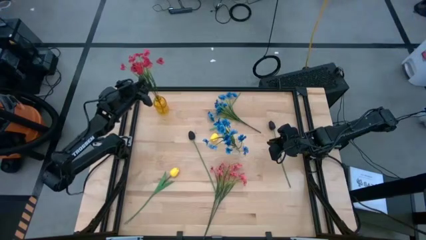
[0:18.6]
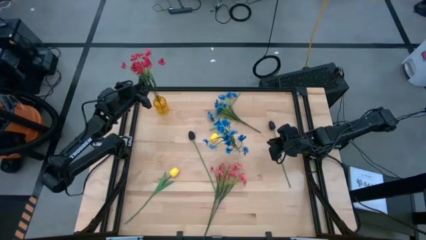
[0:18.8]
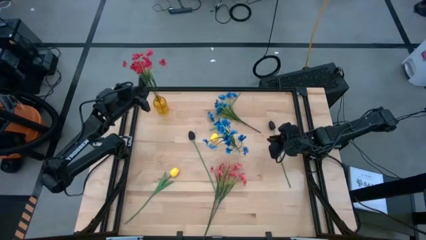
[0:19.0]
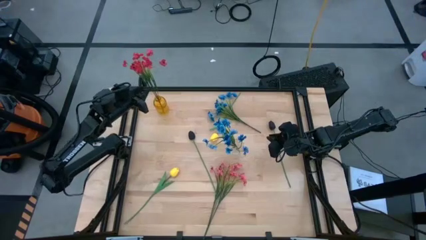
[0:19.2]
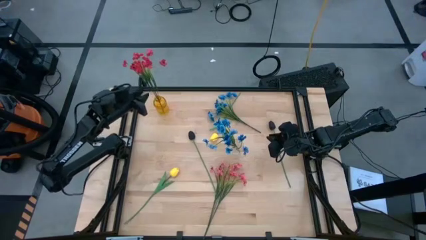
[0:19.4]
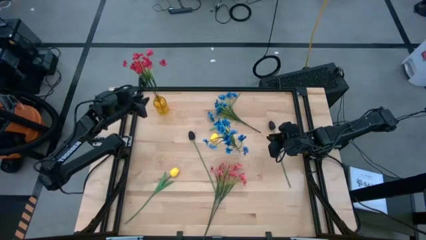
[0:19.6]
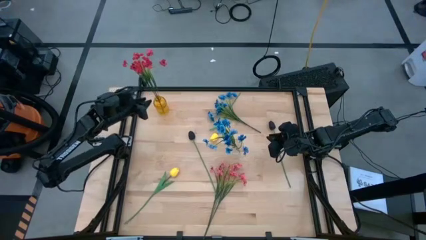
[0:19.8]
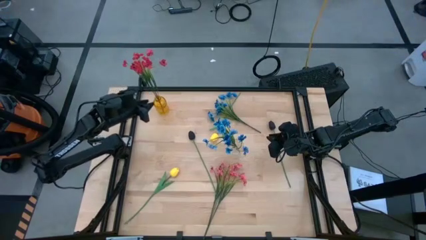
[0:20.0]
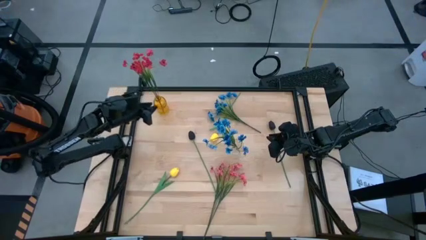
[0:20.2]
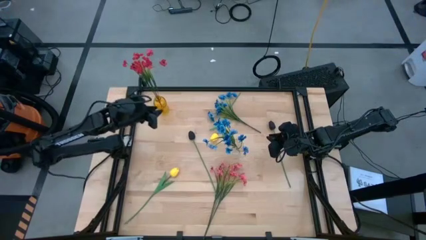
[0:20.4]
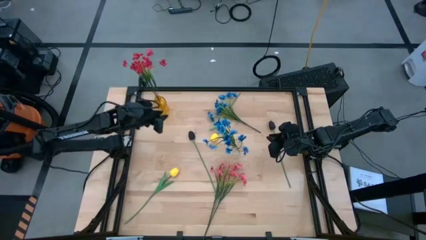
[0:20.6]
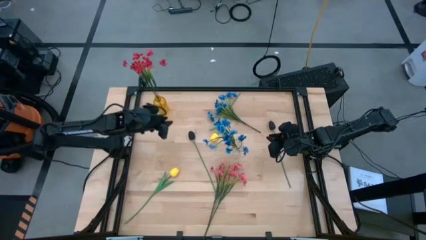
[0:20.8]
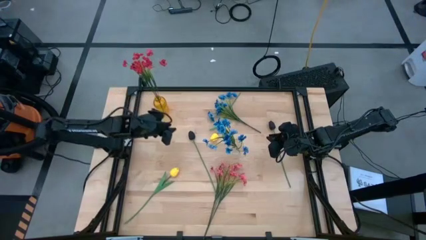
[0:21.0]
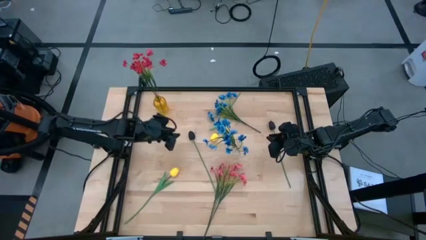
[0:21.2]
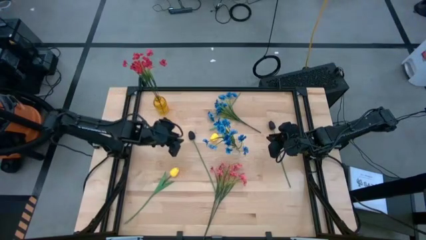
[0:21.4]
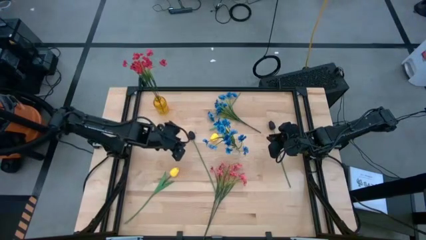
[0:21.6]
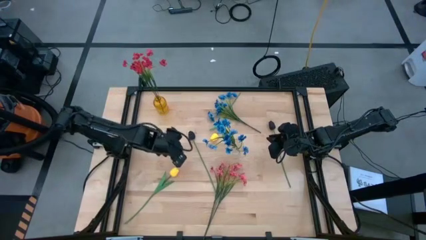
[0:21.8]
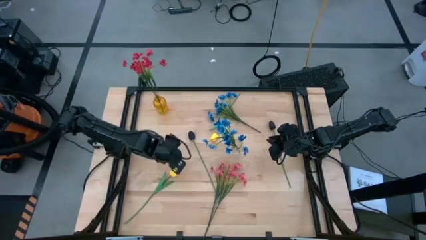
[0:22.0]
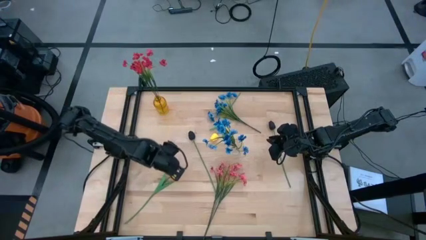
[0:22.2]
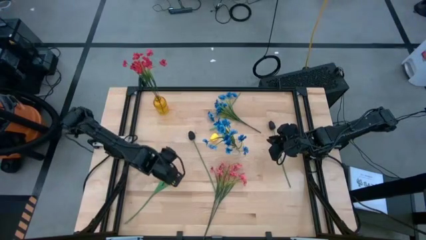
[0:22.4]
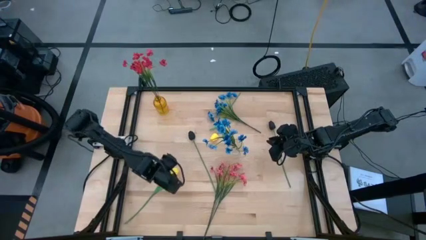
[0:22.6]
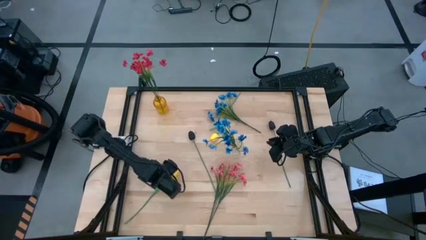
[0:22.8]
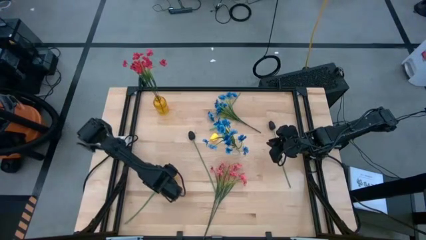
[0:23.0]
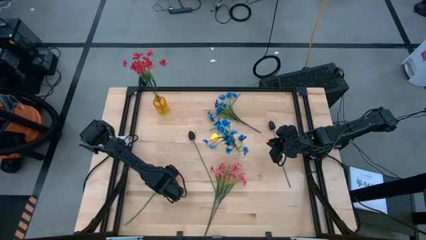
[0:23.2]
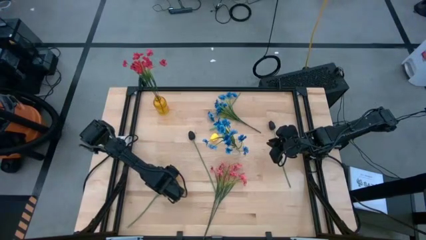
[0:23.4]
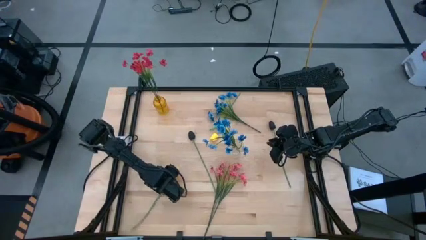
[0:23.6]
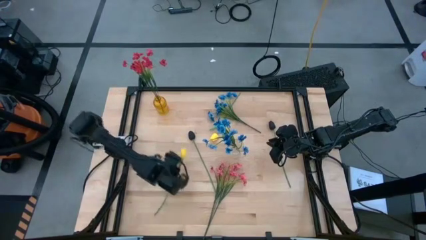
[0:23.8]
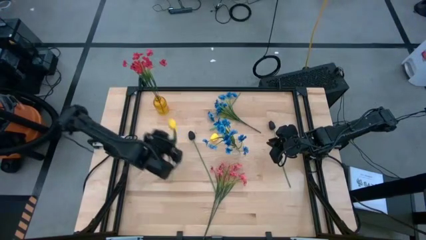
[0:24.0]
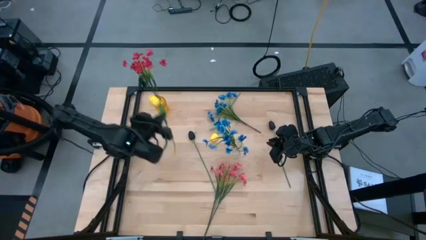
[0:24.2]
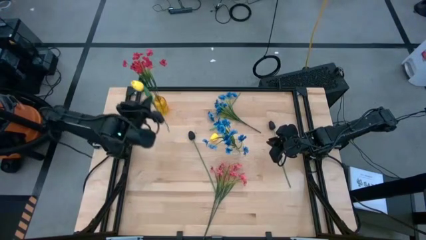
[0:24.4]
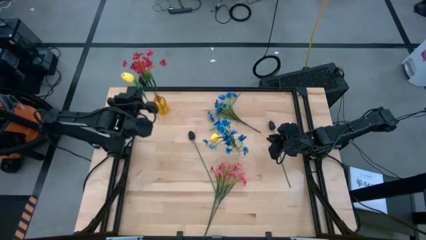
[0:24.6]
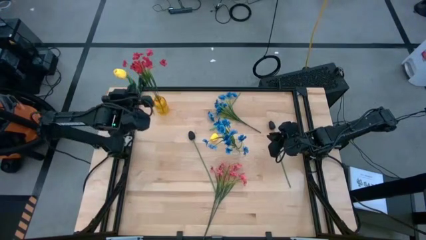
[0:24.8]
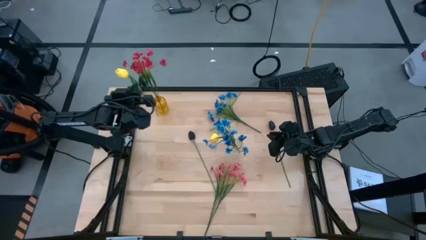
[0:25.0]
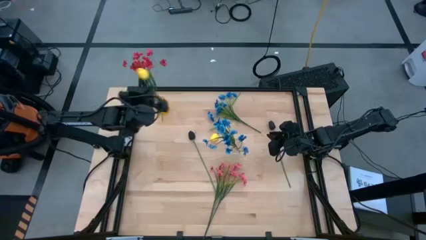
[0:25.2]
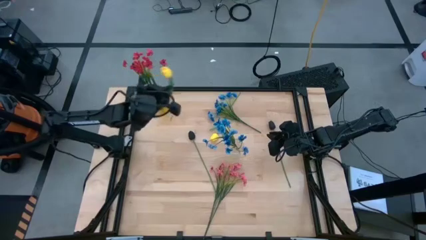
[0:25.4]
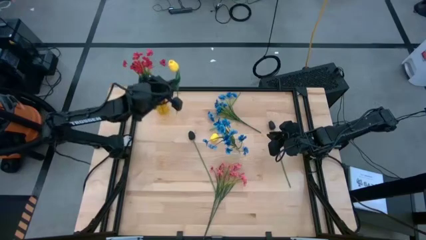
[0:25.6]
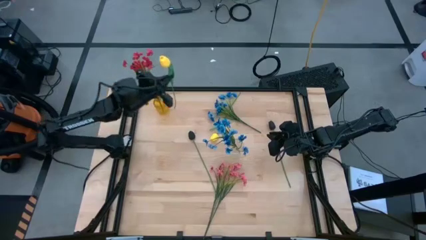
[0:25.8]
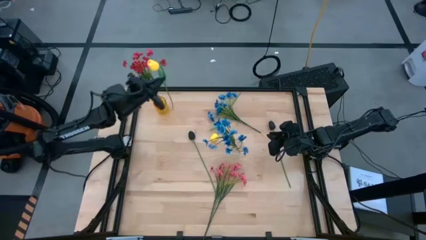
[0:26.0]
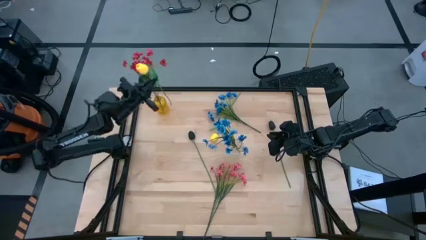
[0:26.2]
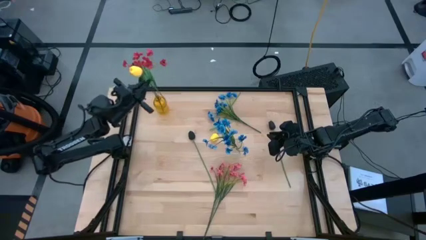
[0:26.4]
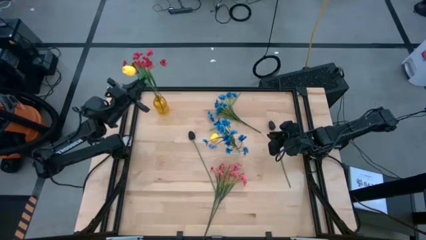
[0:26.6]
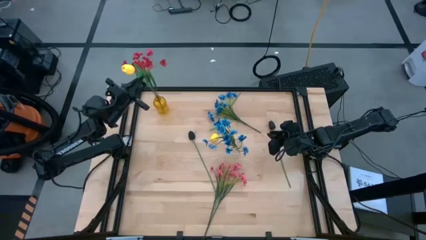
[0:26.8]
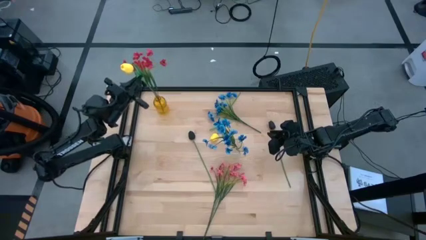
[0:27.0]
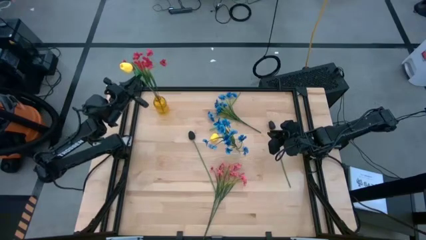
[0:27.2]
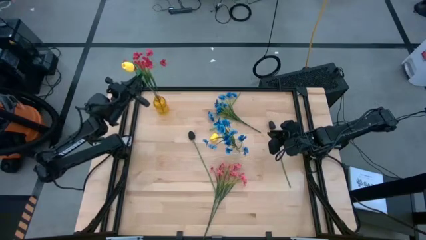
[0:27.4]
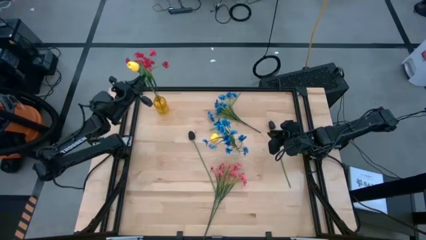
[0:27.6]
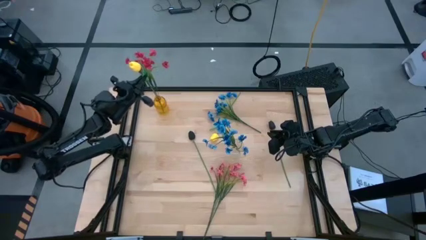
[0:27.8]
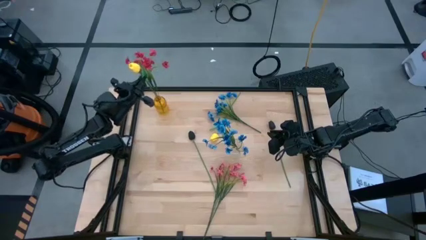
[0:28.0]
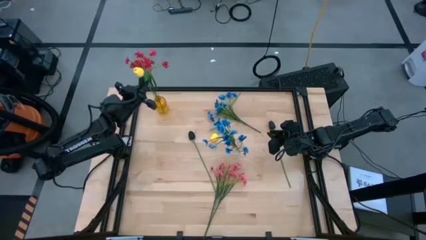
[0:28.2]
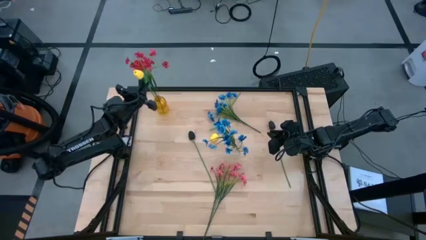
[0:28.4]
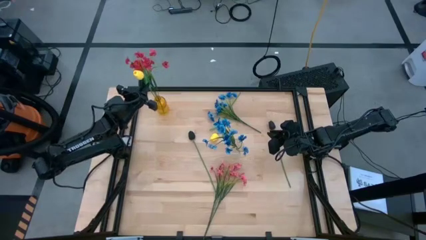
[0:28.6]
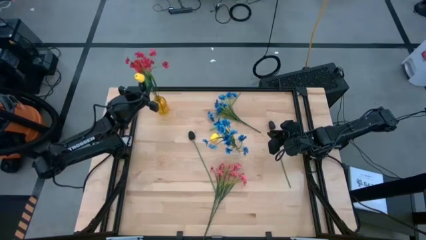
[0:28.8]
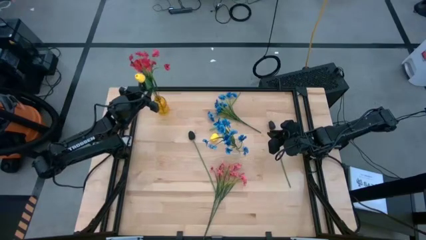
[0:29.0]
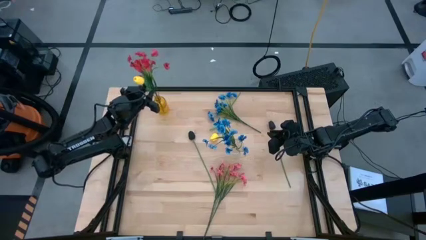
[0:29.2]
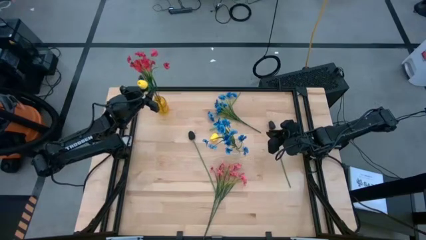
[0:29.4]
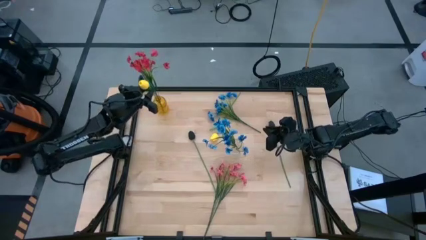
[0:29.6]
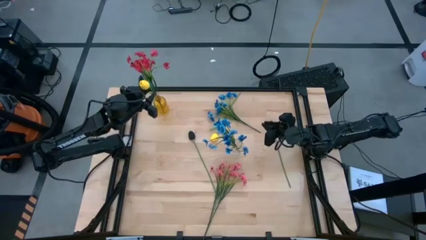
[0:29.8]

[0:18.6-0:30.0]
Task: Sort flowers into vase by color
Put the bottom yellow tulip into the yellow vase

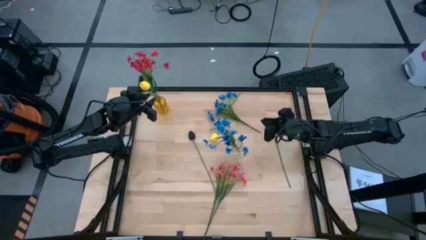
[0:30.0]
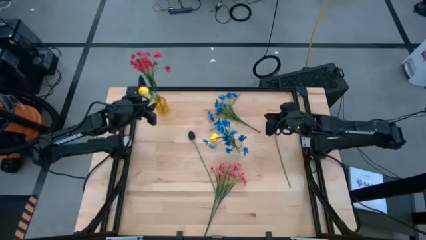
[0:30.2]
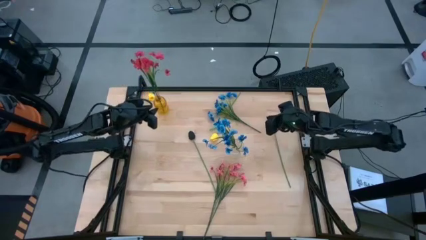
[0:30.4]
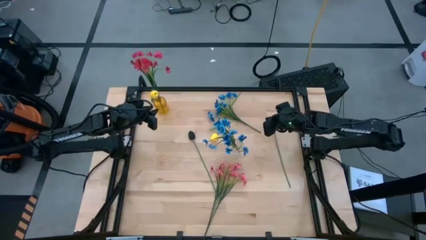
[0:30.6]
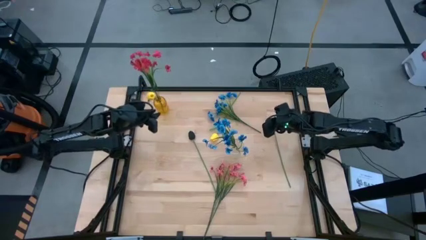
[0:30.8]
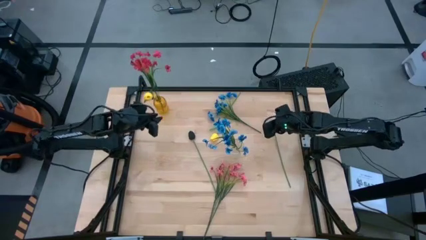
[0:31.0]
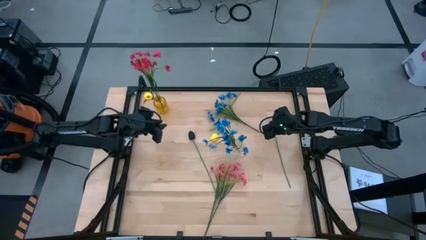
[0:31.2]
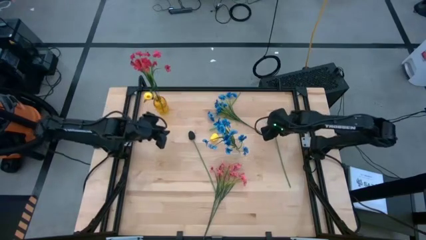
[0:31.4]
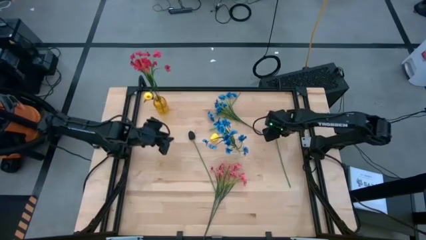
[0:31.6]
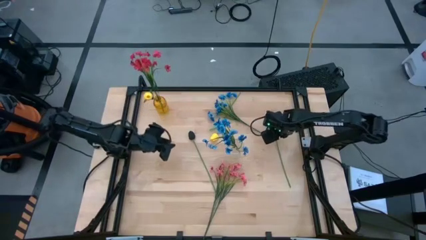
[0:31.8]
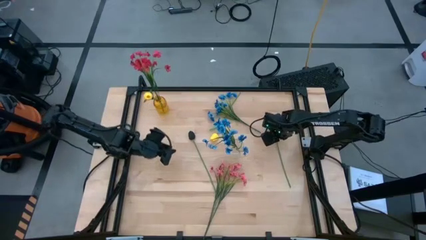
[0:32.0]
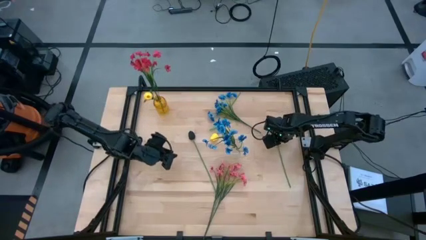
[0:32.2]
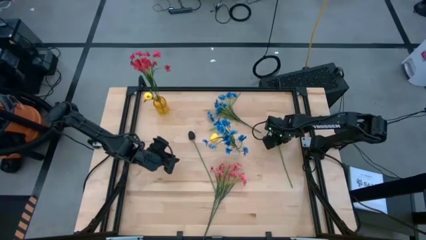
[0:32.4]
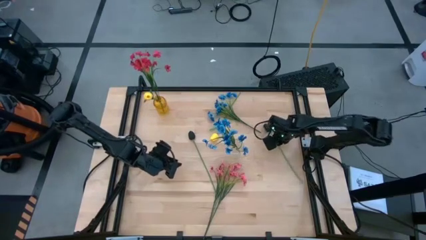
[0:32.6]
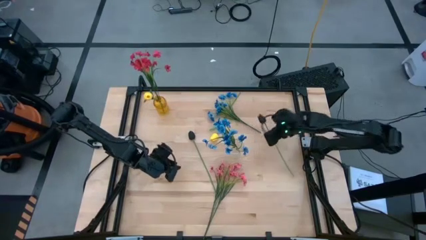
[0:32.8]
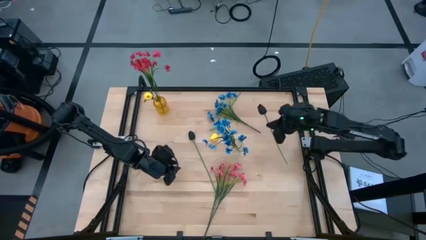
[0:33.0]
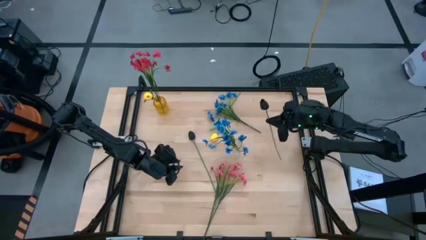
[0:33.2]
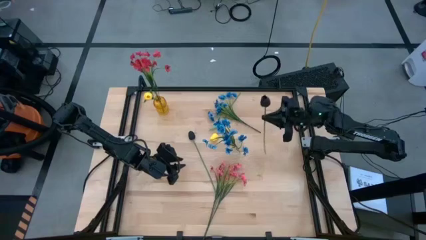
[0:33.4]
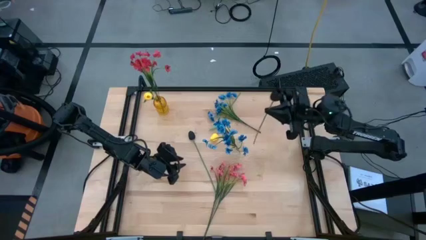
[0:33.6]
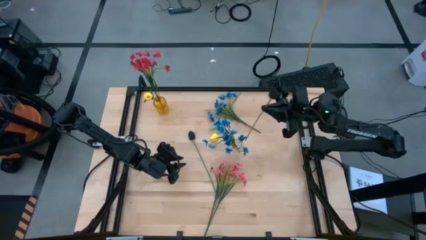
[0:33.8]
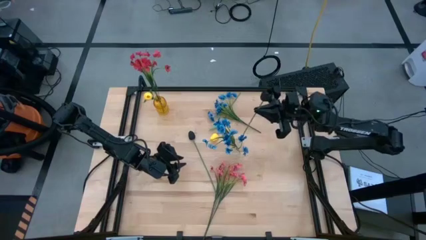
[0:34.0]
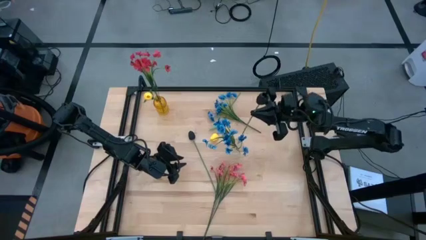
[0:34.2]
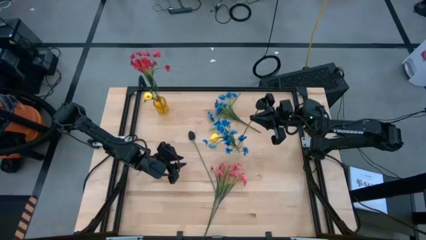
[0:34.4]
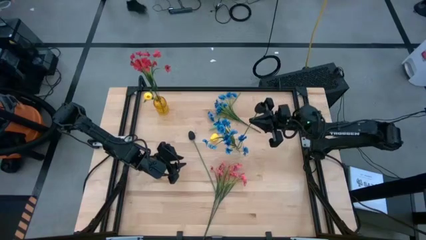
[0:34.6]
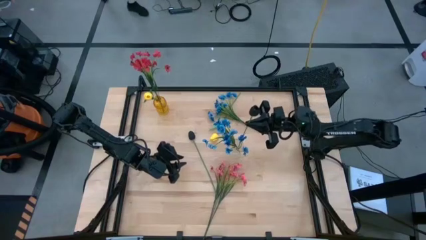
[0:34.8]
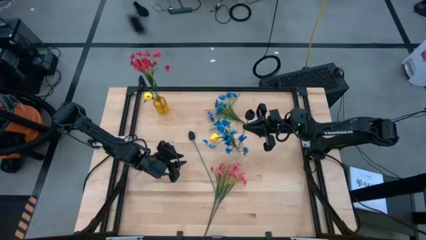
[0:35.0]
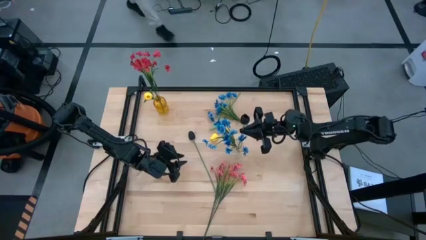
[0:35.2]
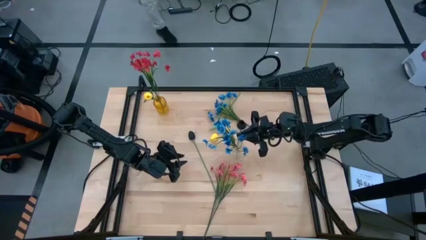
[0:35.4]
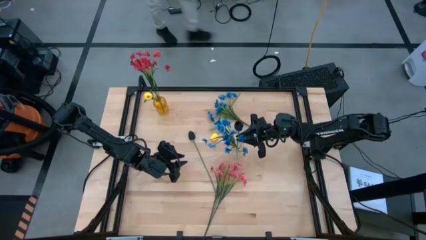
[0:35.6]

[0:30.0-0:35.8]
Put the right black tulip into the transparent vase
